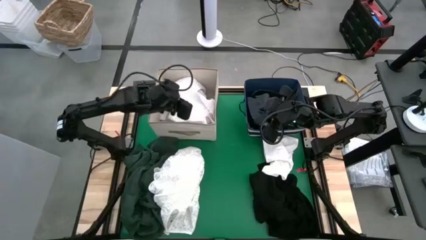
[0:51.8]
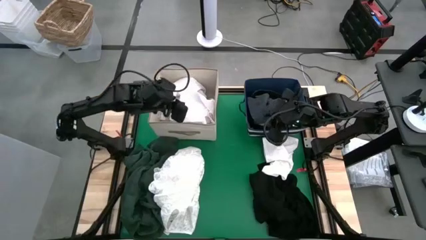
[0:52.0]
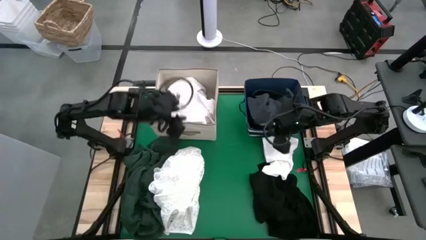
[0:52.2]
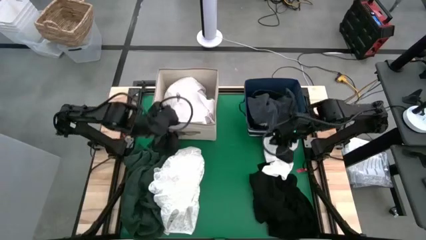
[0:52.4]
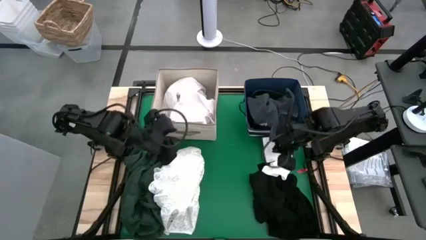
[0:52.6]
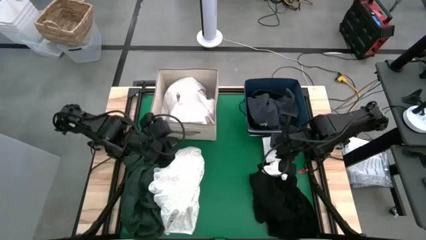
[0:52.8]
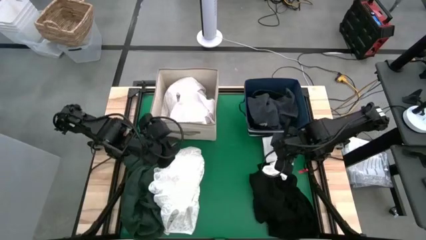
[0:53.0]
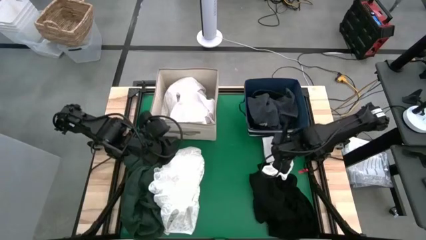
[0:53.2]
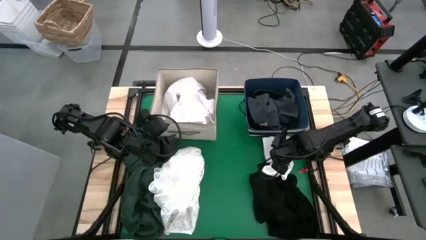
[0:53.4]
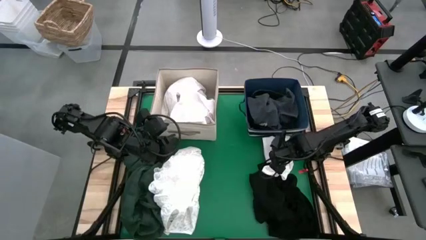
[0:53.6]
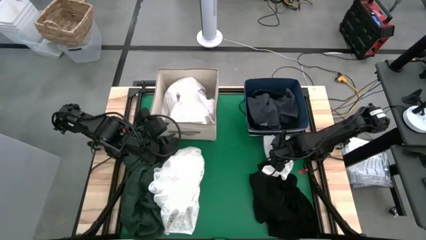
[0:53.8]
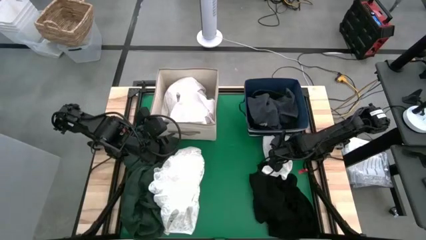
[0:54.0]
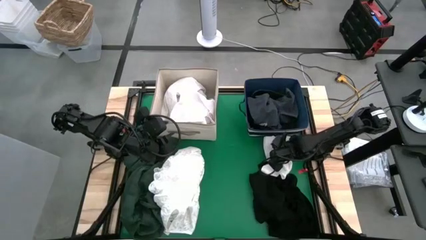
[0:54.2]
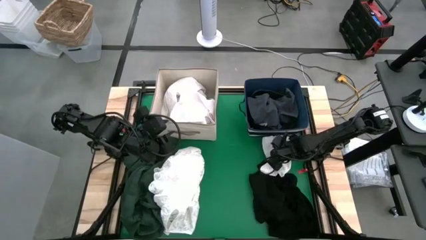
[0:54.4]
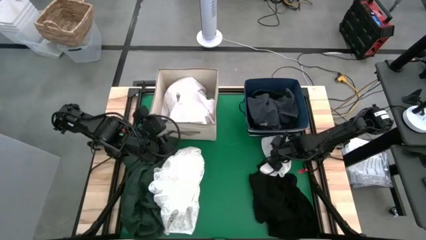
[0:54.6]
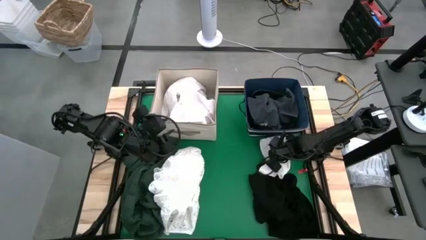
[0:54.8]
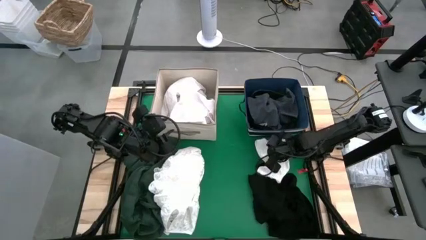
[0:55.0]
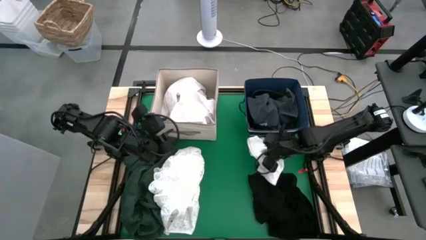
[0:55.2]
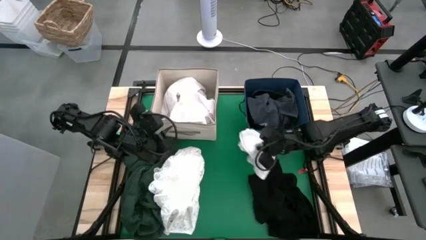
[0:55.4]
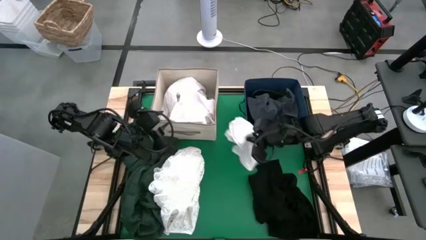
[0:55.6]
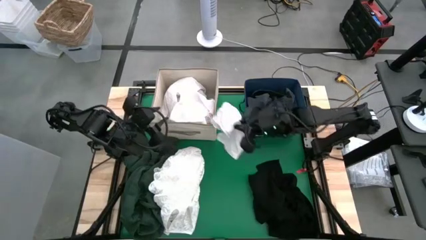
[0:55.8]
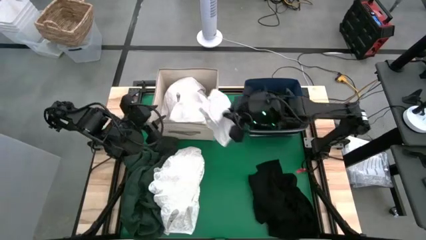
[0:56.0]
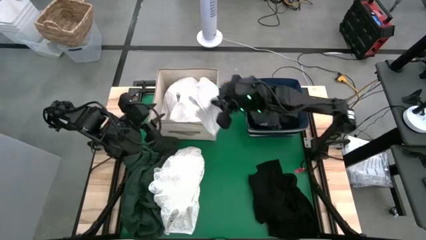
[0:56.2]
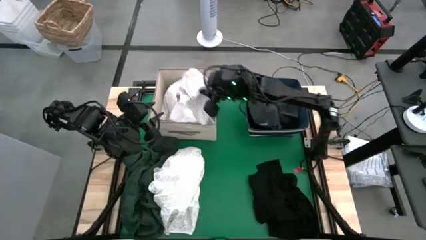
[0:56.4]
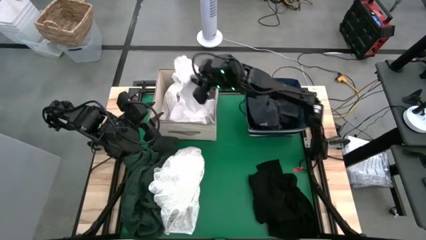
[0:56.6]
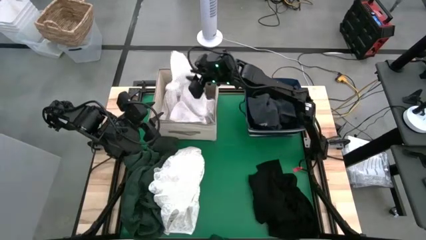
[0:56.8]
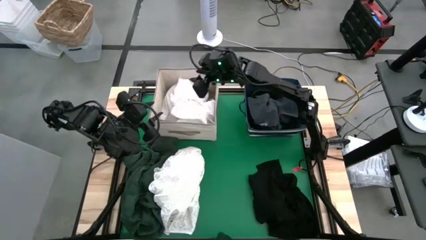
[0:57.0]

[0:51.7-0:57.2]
Put the white shorts into the white laundry bin

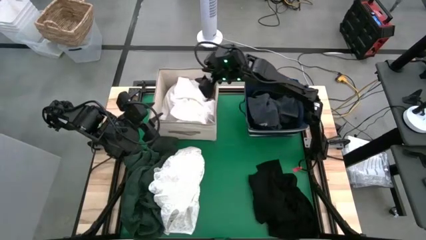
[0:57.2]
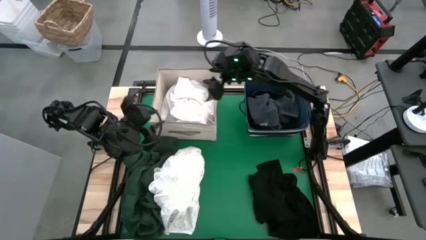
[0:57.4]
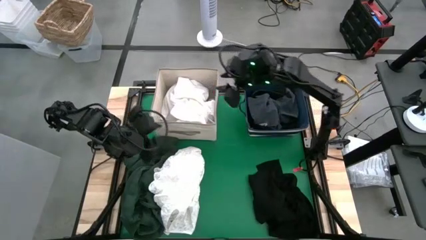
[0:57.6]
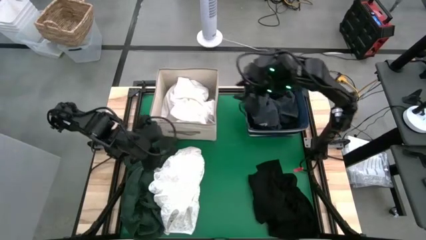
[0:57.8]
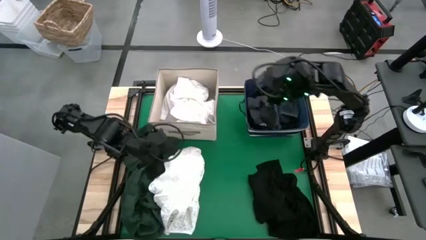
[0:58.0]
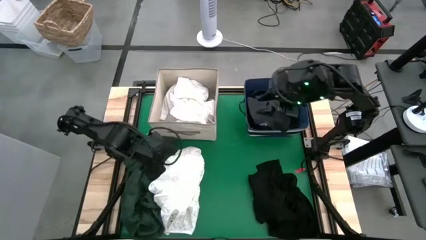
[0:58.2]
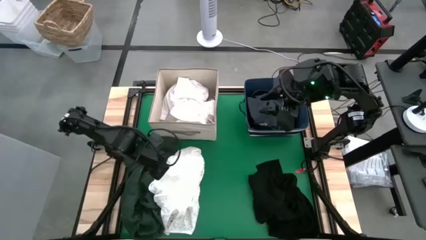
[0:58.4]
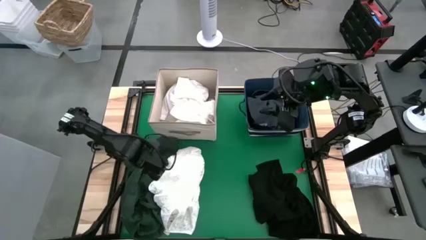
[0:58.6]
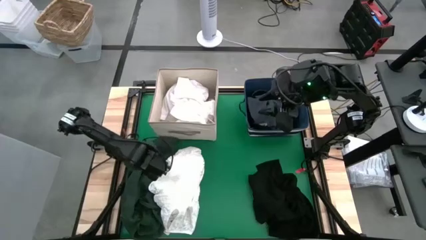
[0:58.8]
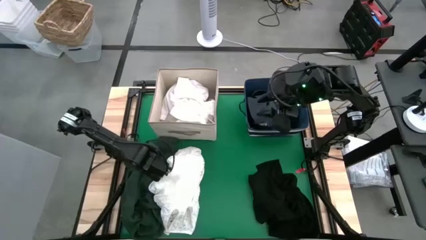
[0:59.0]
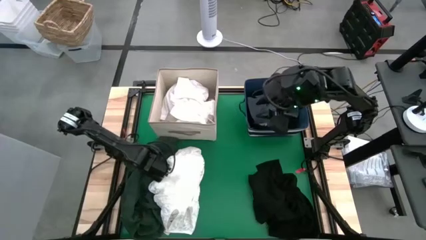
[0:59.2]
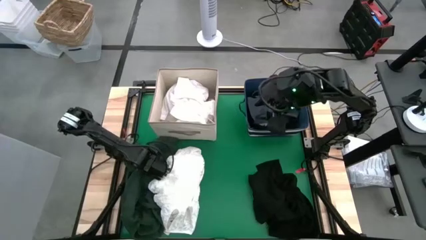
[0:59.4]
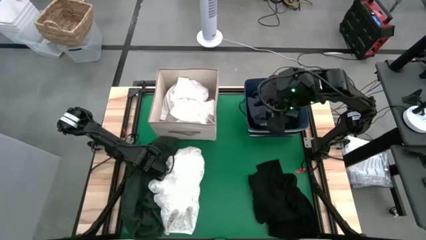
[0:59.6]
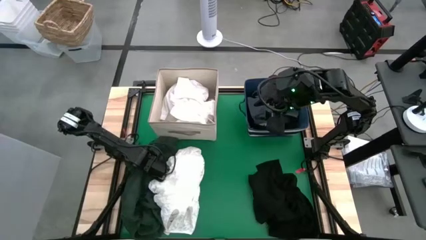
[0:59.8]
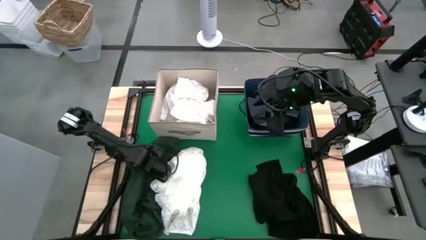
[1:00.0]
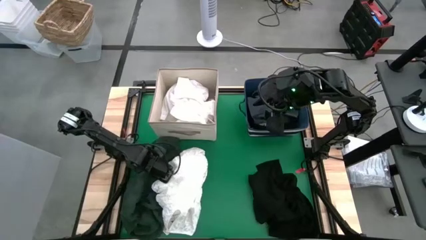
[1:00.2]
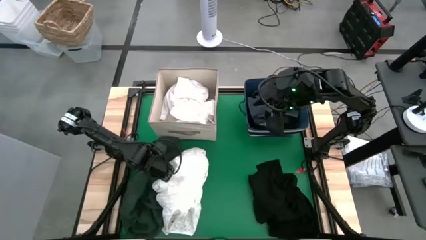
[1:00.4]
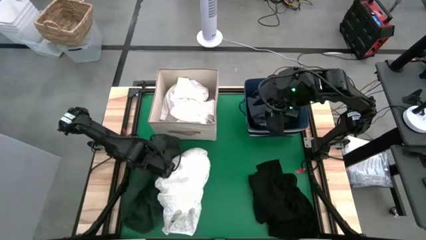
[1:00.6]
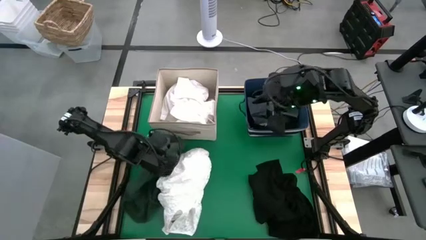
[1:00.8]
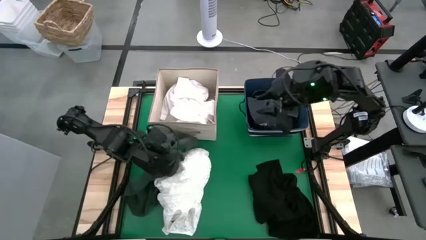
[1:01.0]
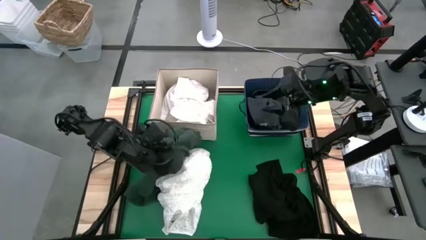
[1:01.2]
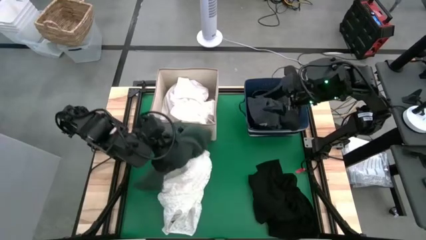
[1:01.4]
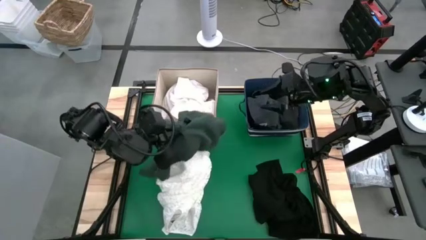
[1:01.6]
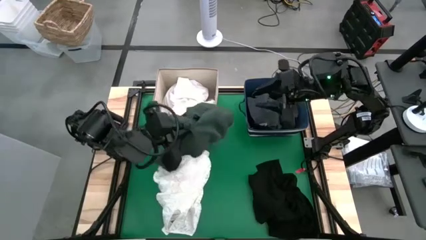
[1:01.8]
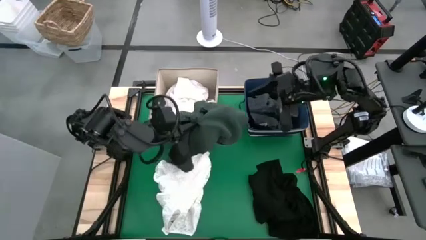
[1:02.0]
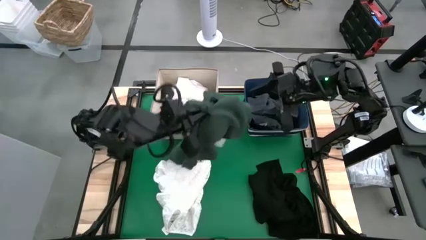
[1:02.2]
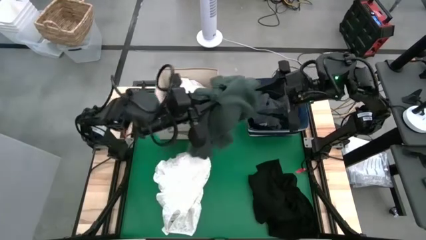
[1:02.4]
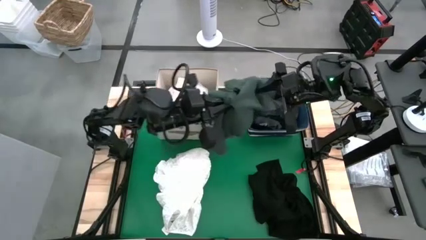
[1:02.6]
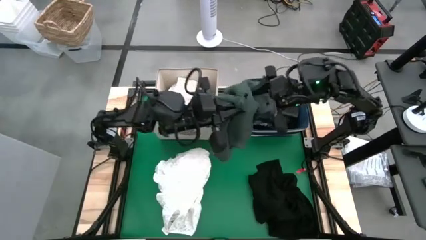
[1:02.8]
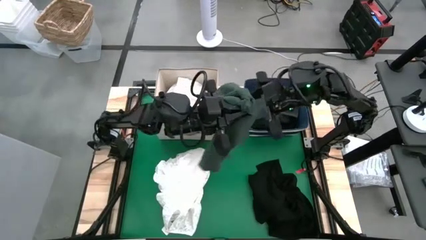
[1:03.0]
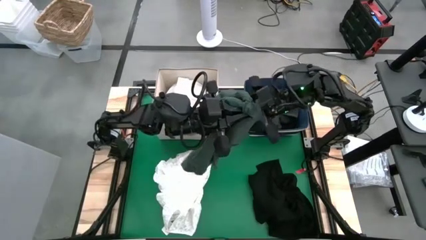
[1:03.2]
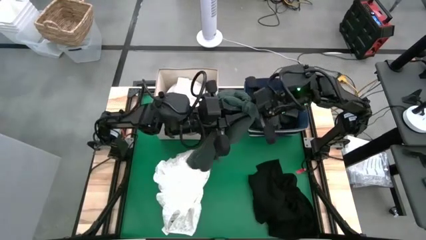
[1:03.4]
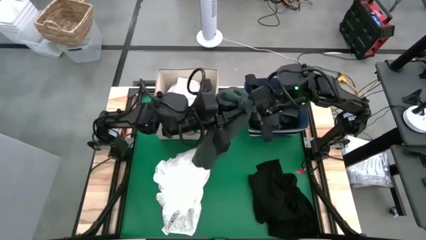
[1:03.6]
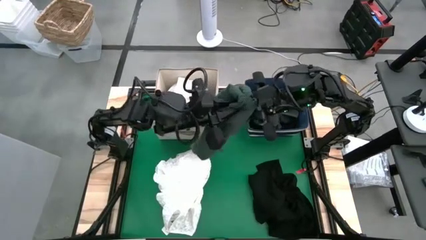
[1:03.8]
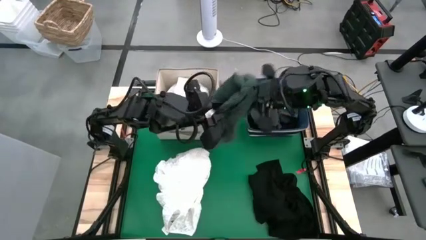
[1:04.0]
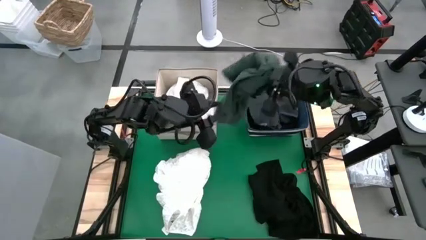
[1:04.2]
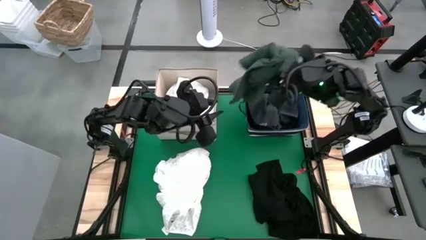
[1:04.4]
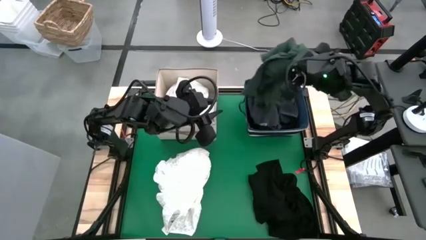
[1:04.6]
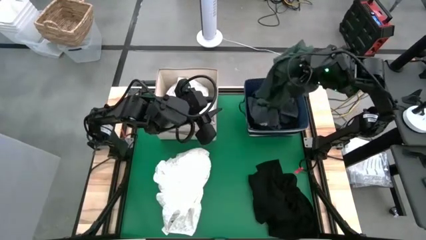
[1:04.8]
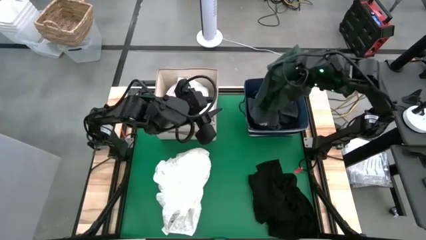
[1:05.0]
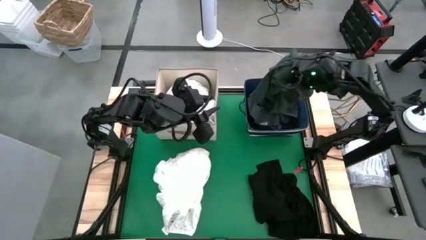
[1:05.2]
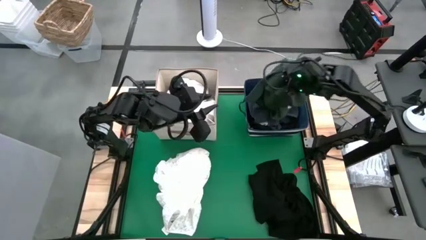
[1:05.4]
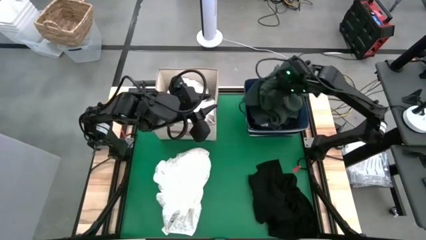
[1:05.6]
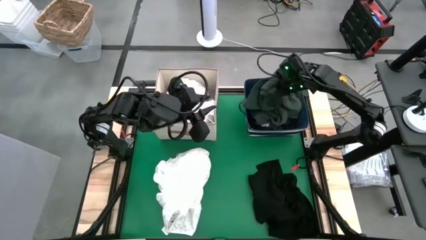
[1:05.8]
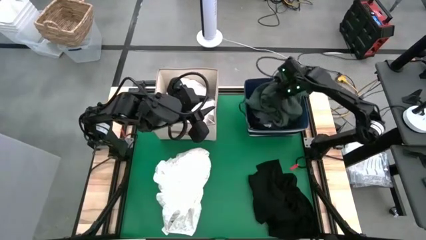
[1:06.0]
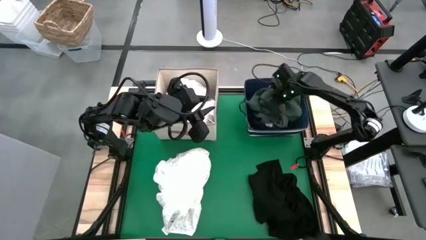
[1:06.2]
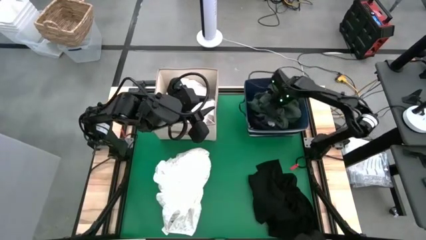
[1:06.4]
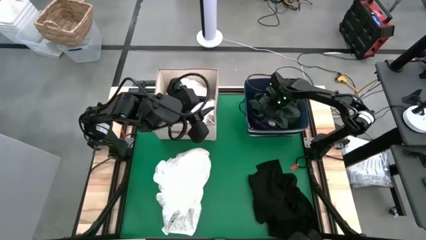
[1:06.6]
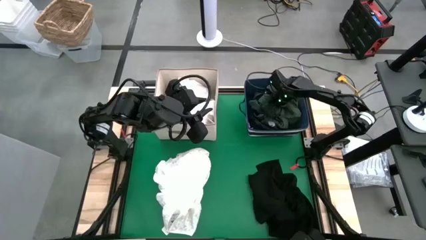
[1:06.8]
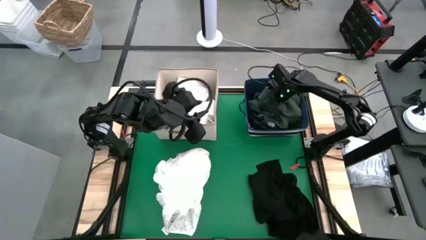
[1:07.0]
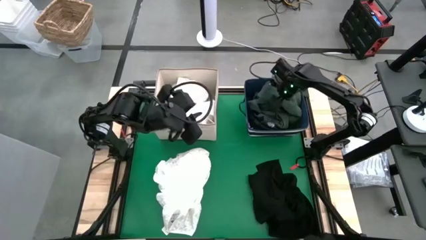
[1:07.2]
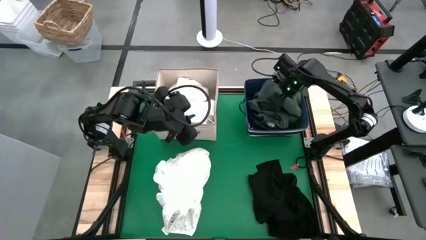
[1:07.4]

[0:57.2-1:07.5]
Put the green shirt into the blue laundry bin
